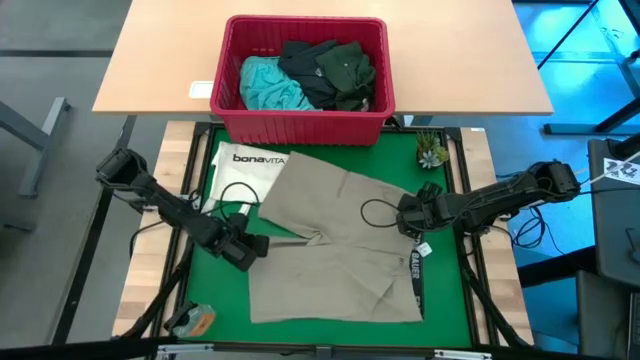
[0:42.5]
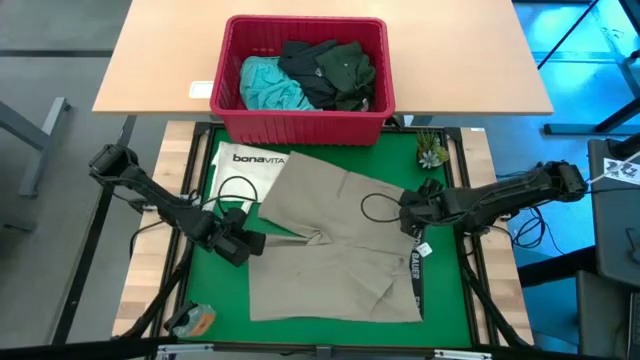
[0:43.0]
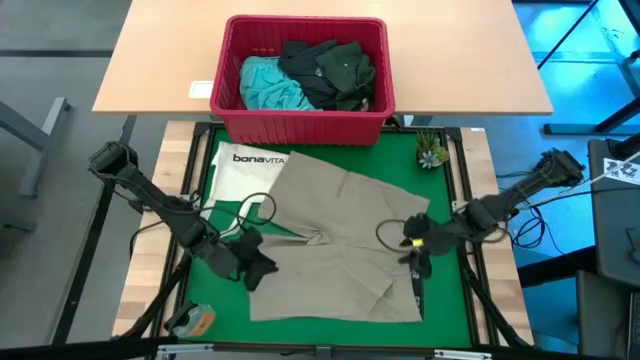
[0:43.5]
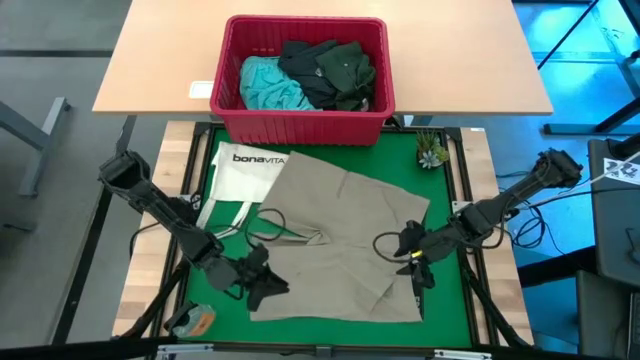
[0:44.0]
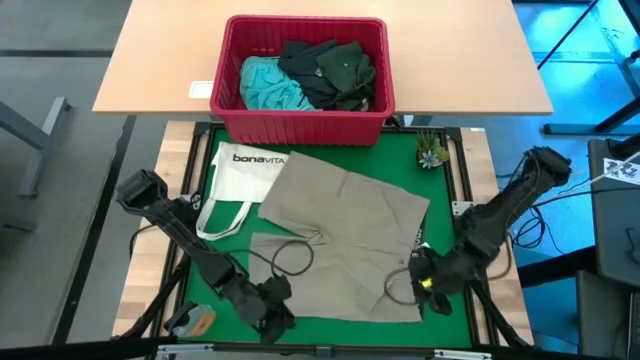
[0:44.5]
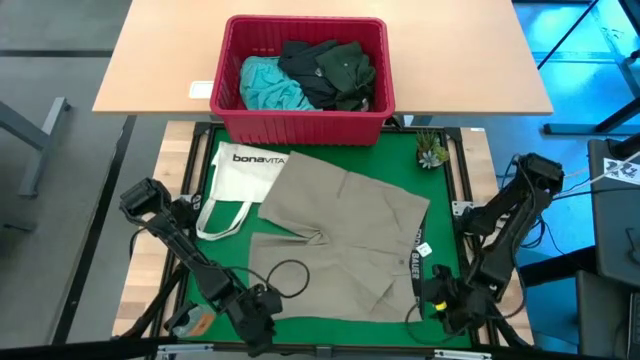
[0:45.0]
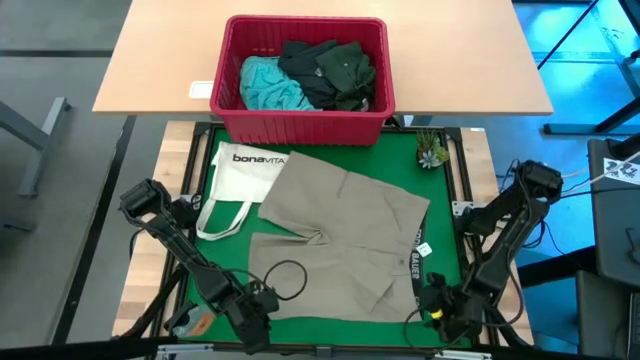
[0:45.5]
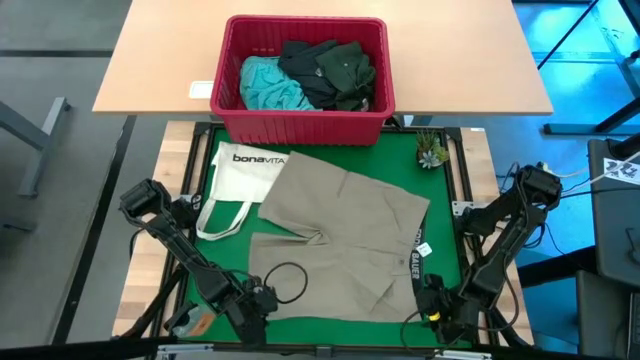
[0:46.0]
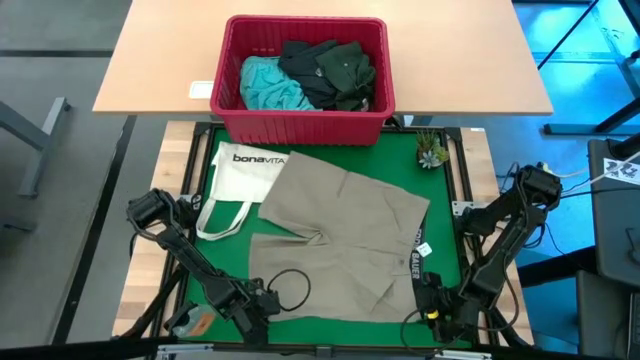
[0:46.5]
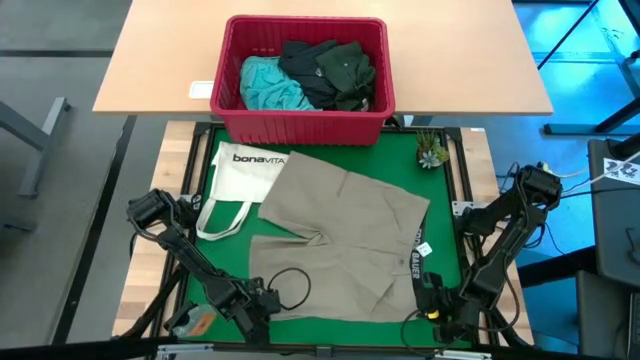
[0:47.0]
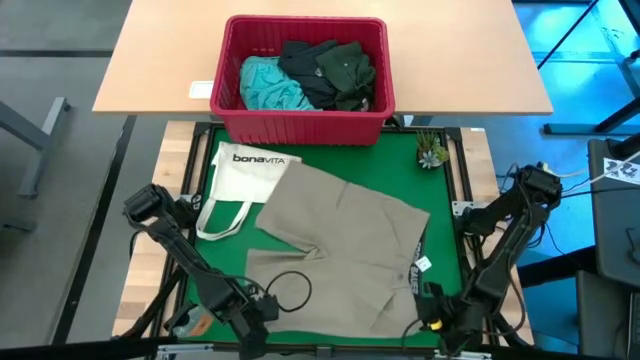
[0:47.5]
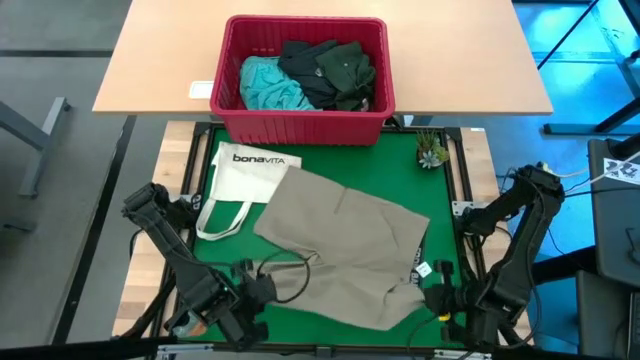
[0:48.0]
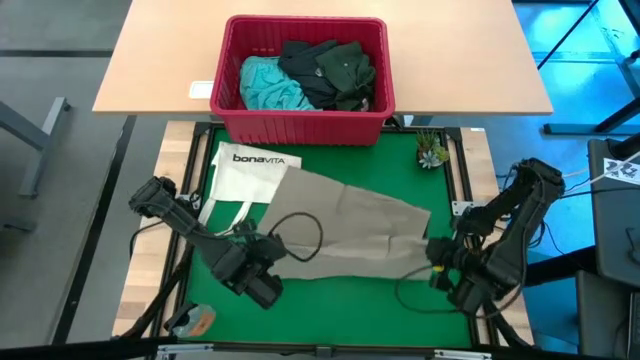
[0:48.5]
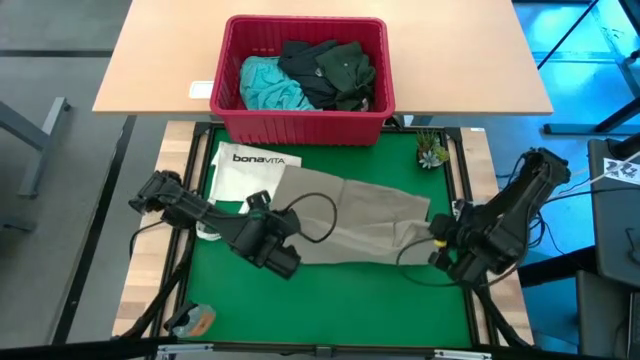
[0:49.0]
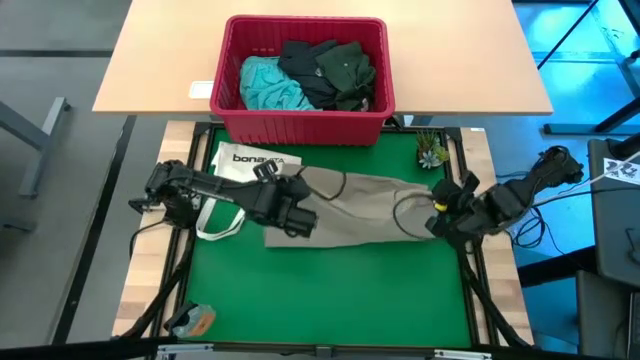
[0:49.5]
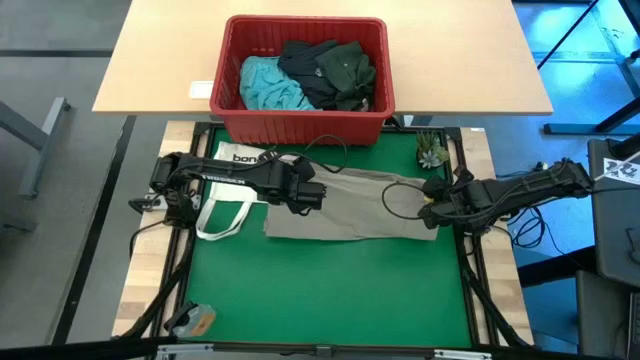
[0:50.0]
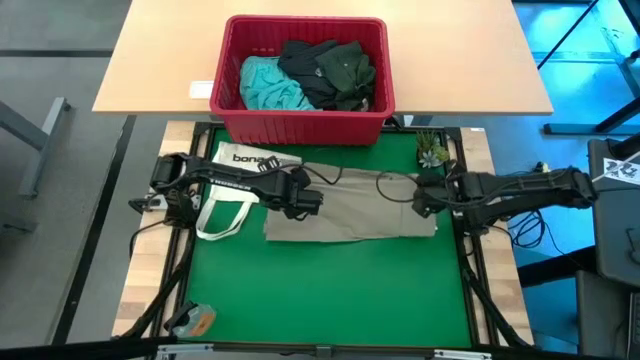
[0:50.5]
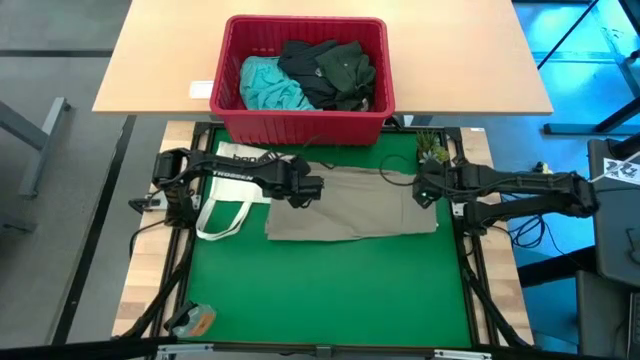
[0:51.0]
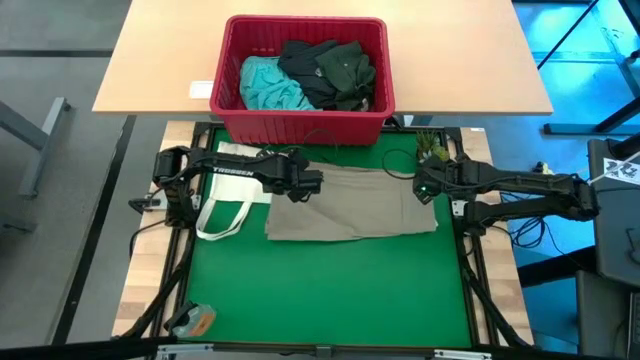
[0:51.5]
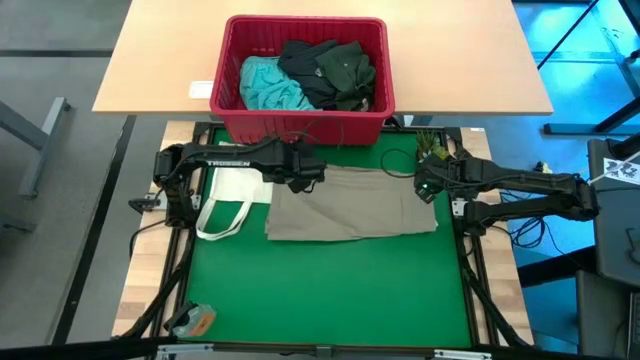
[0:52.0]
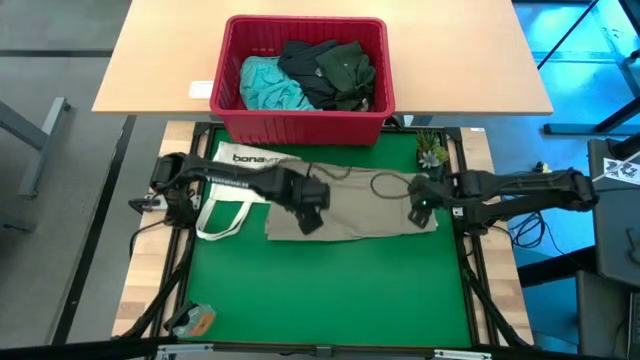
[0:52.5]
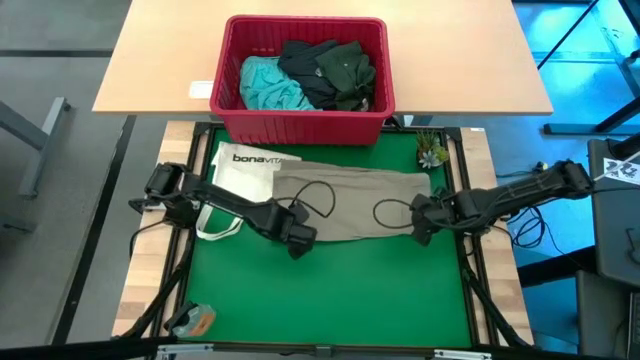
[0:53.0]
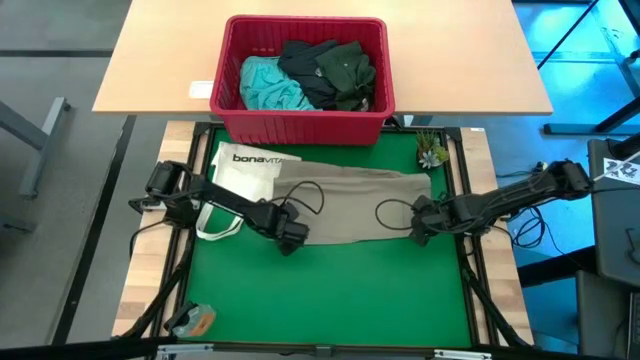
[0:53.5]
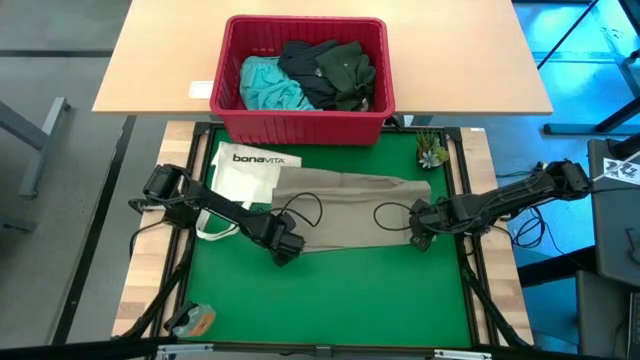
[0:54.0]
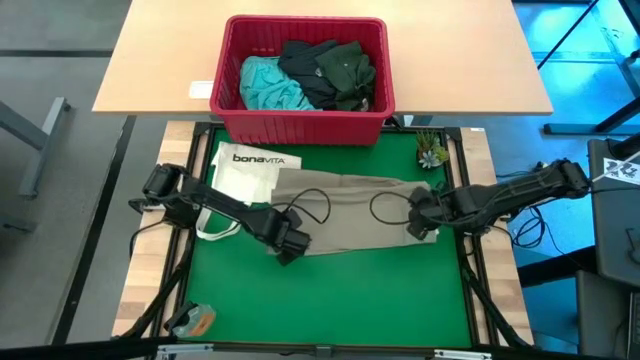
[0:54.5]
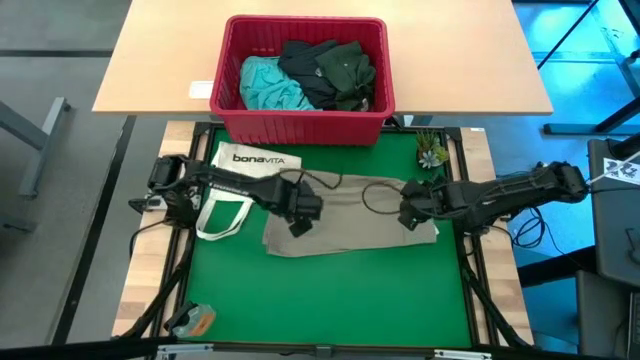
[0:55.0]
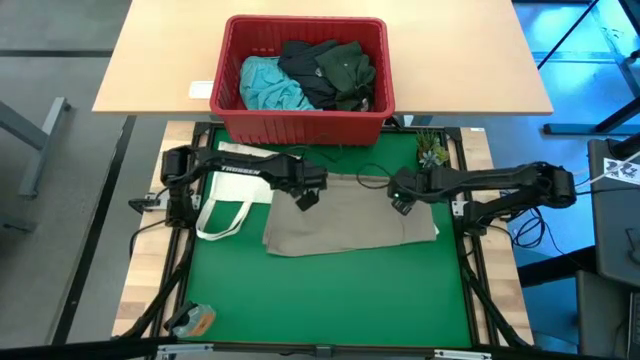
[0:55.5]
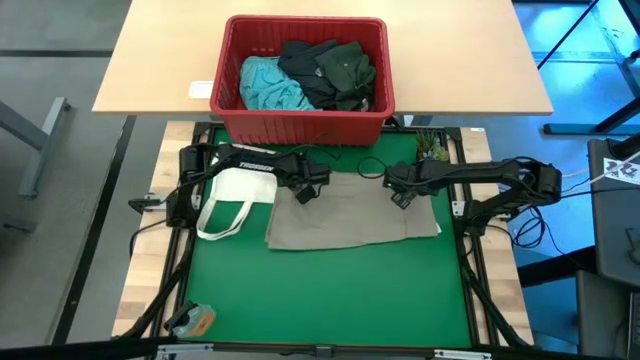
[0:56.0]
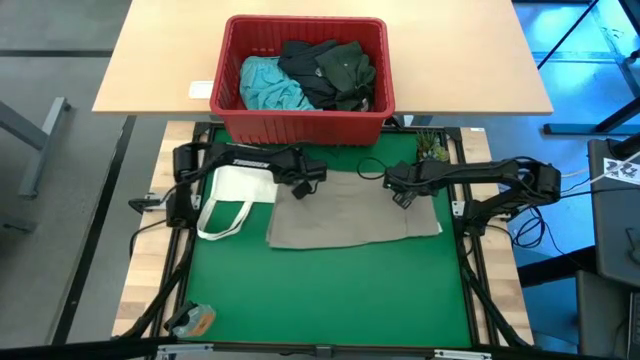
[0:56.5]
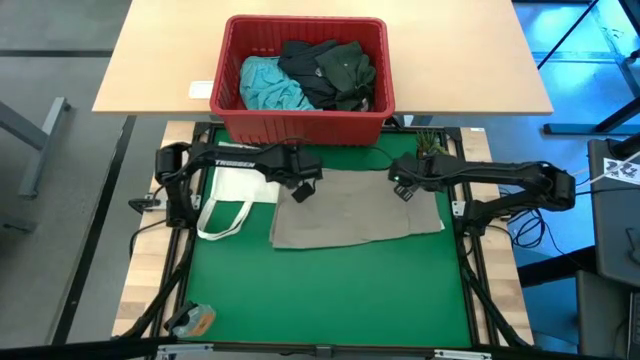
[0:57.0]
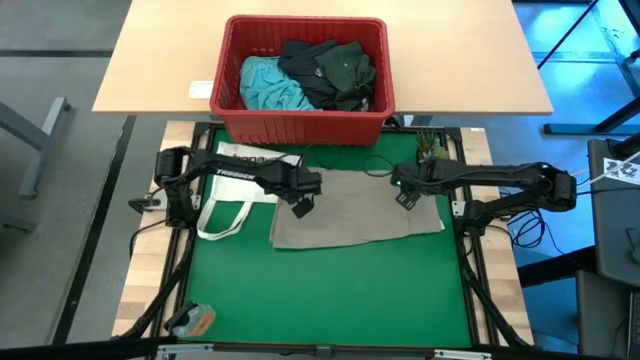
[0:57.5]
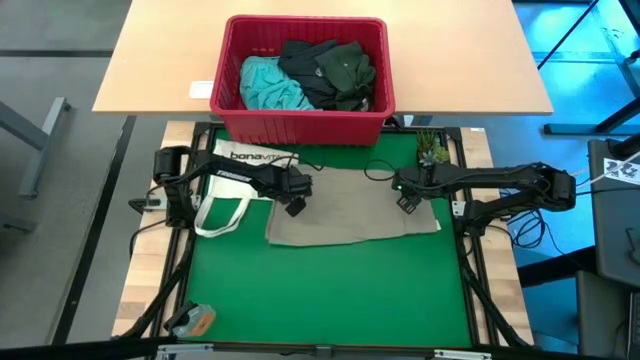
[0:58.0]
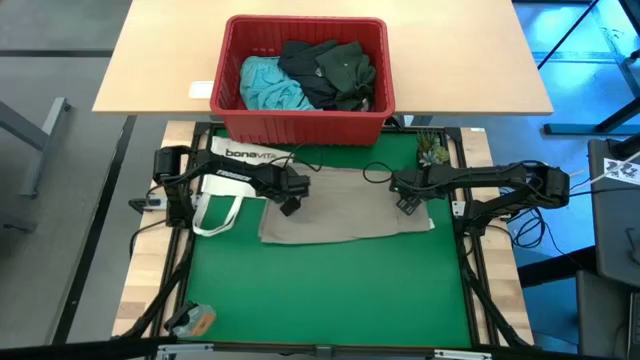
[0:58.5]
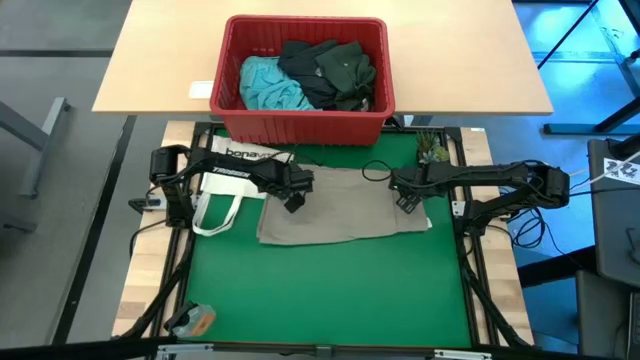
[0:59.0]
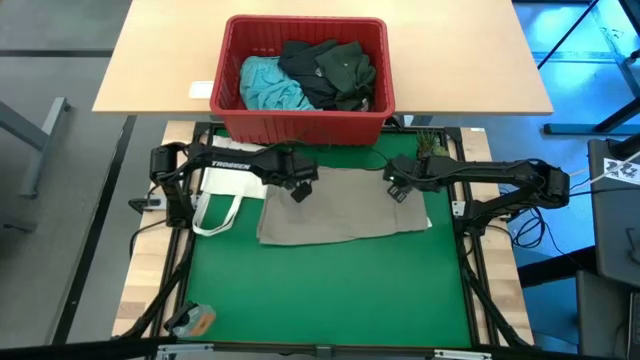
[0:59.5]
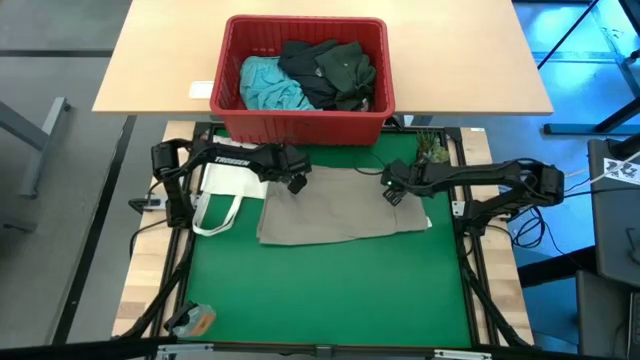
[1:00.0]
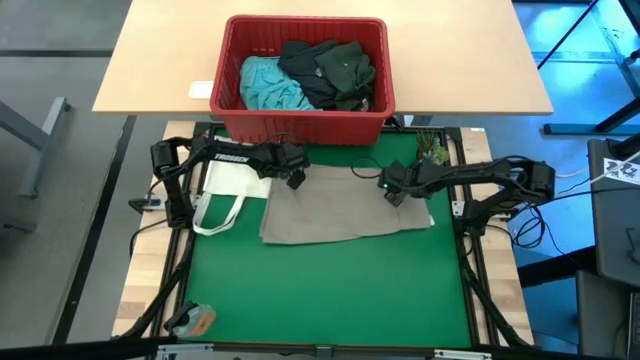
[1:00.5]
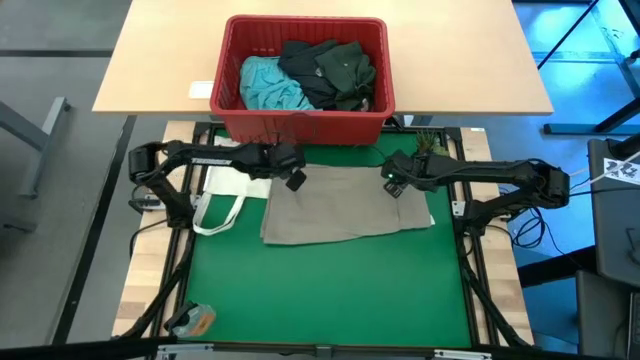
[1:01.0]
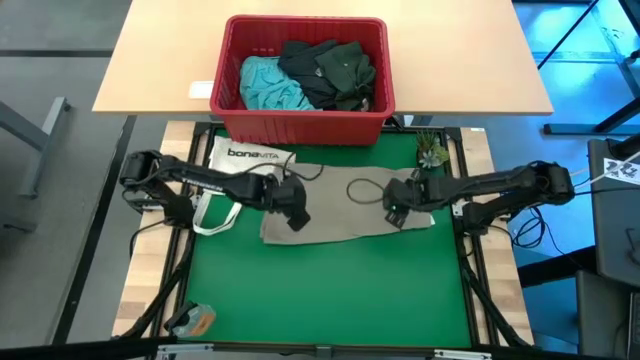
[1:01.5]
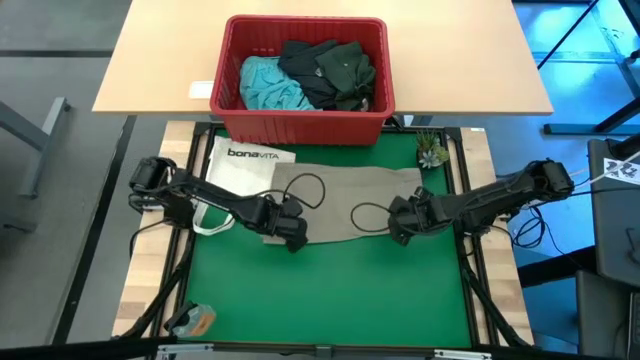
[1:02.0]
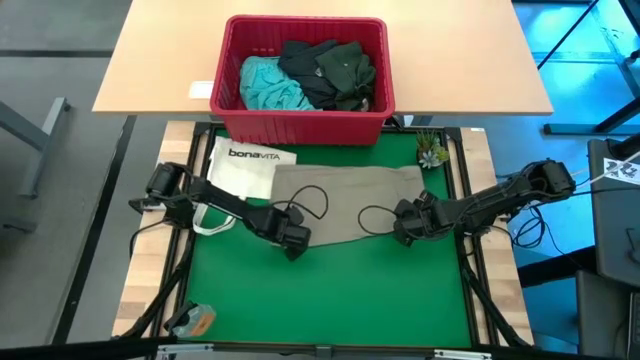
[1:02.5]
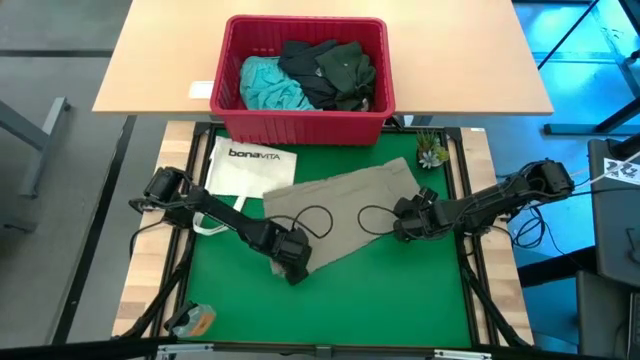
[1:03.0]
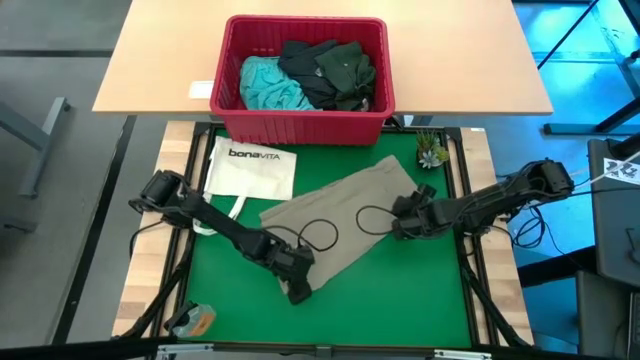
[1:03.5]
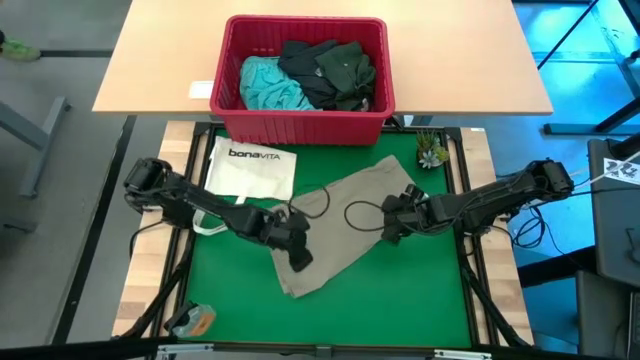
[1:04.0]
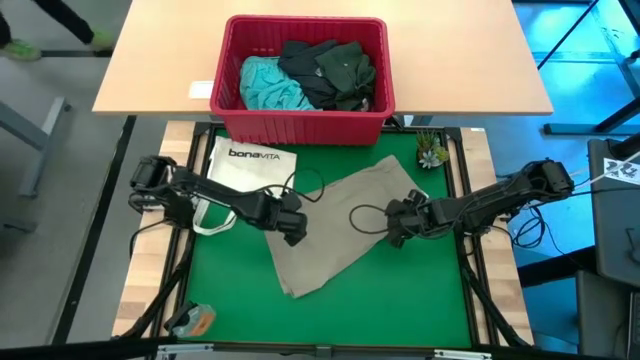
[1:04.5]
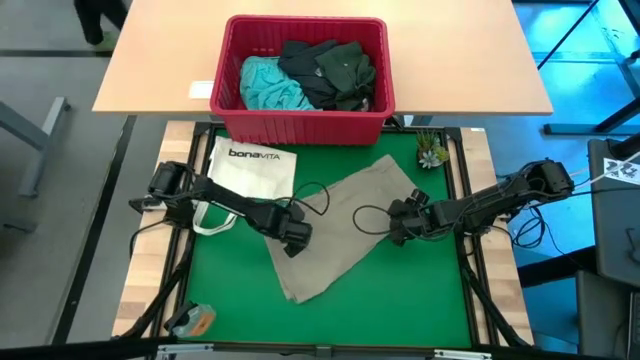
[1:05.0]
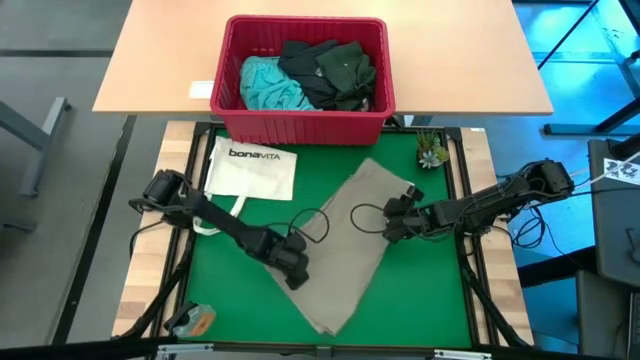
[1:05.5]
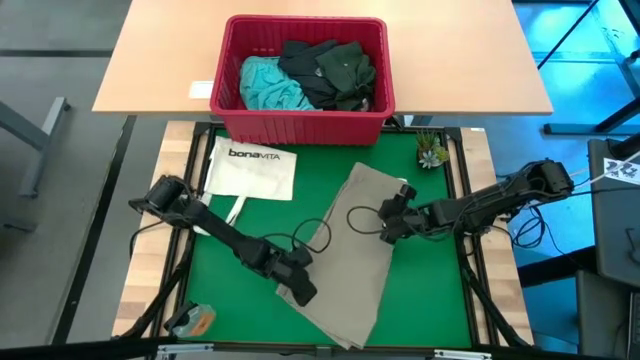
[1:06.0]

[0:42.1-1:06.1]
Task: Fold Laundry from Bin
Fold the light brown shorts
